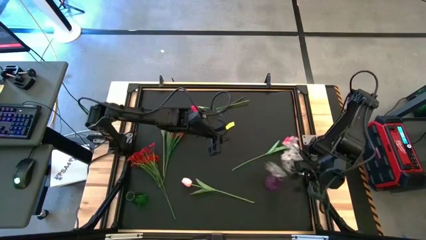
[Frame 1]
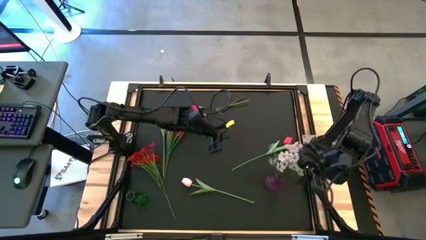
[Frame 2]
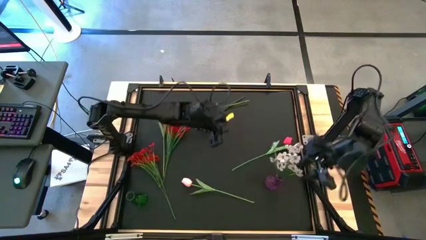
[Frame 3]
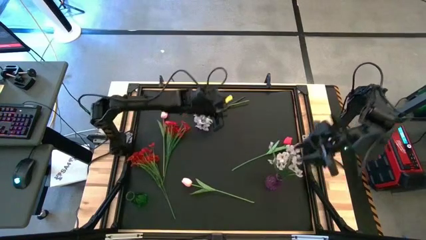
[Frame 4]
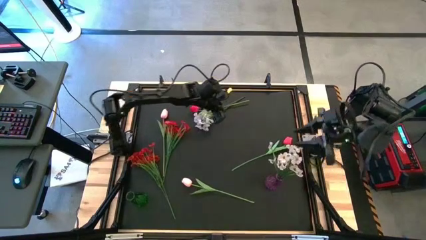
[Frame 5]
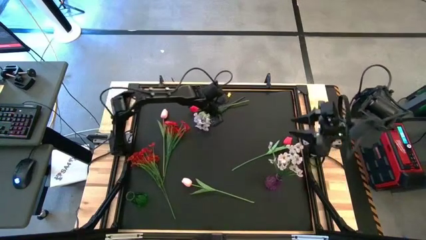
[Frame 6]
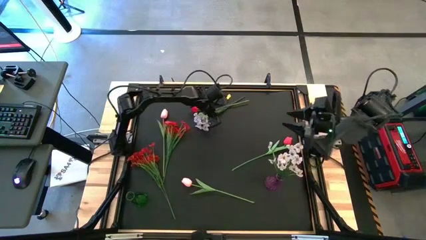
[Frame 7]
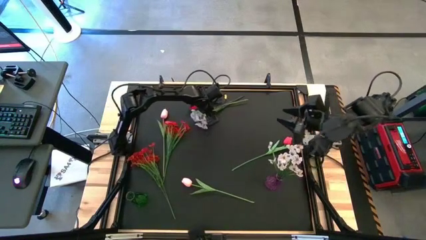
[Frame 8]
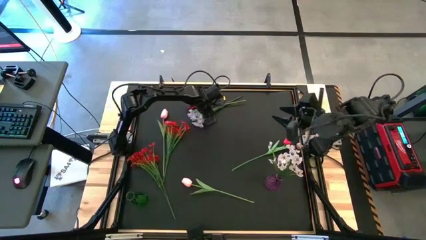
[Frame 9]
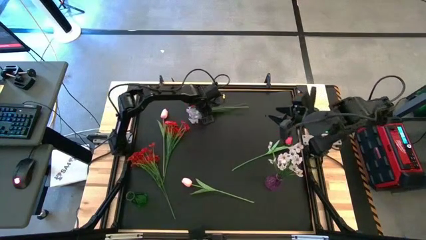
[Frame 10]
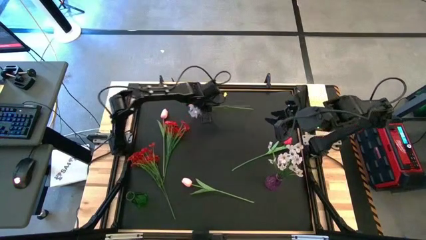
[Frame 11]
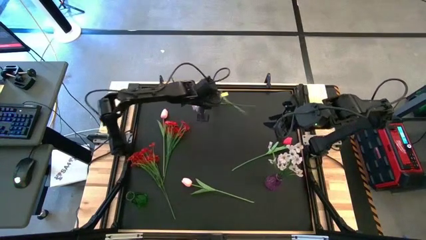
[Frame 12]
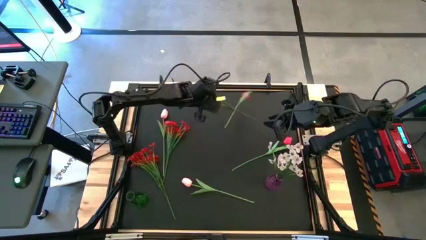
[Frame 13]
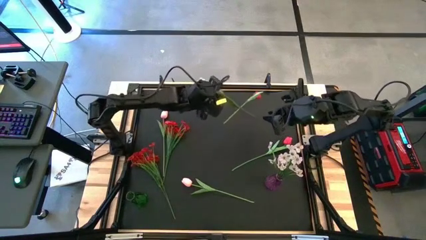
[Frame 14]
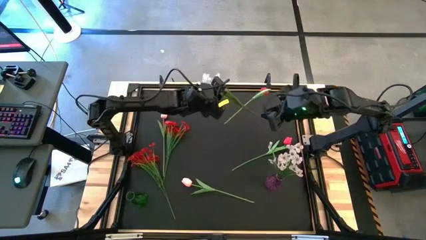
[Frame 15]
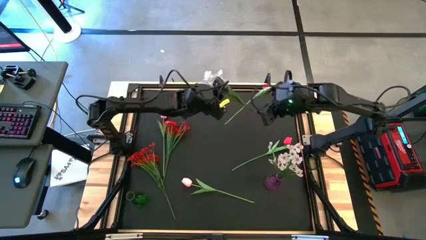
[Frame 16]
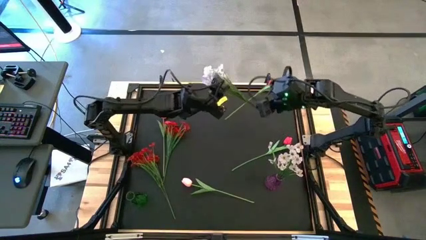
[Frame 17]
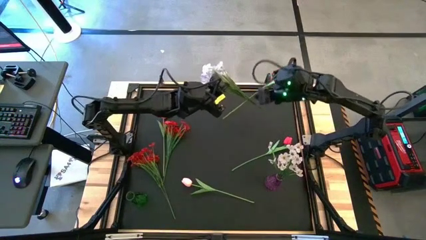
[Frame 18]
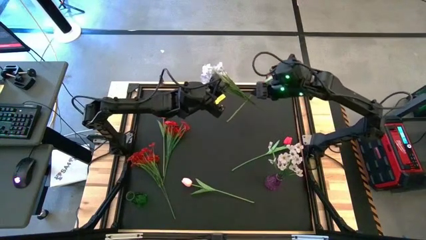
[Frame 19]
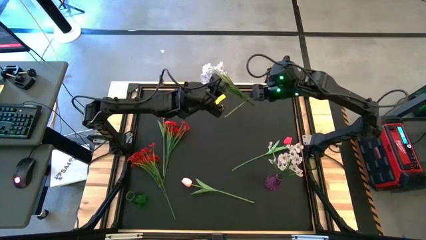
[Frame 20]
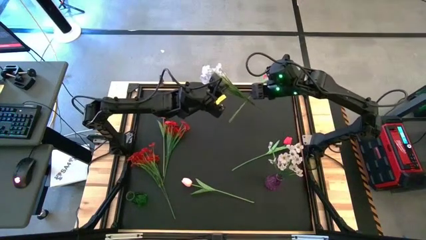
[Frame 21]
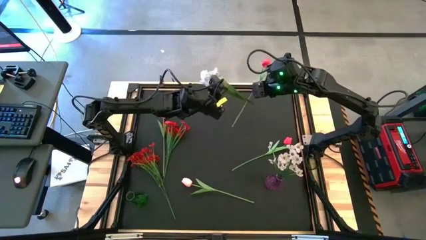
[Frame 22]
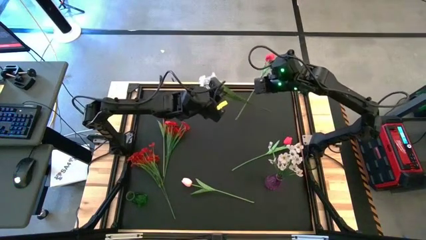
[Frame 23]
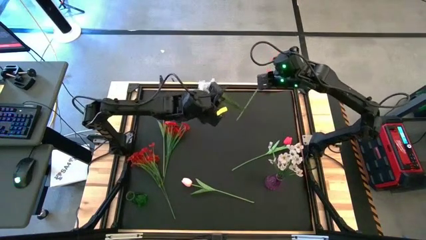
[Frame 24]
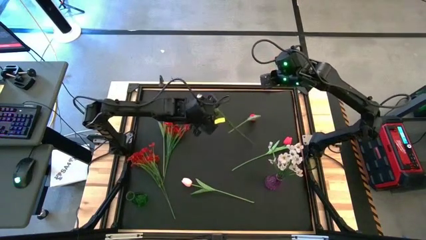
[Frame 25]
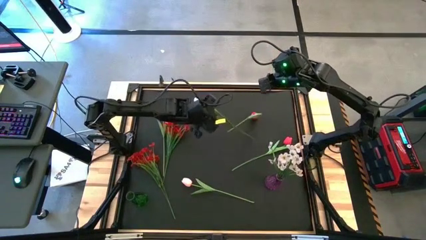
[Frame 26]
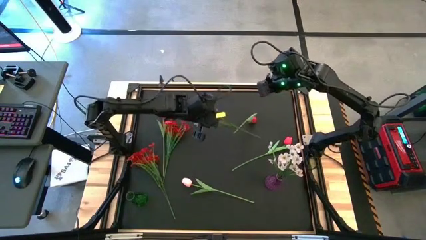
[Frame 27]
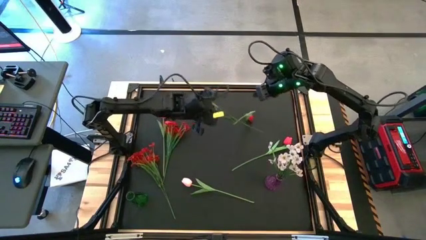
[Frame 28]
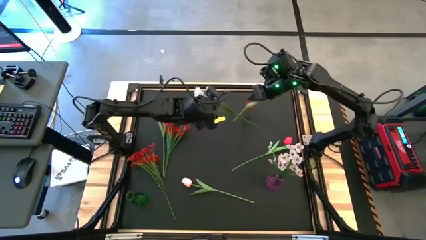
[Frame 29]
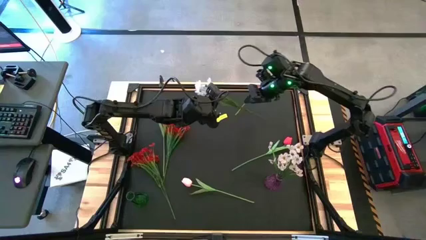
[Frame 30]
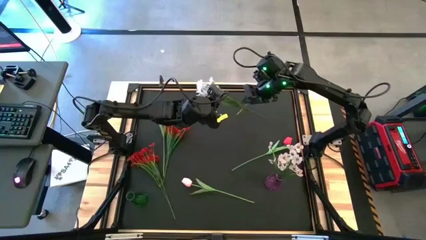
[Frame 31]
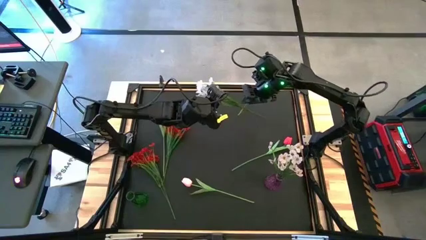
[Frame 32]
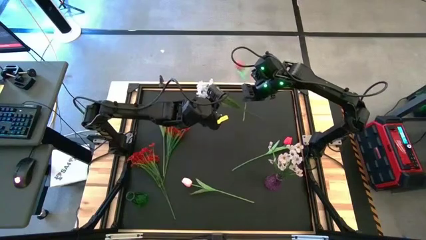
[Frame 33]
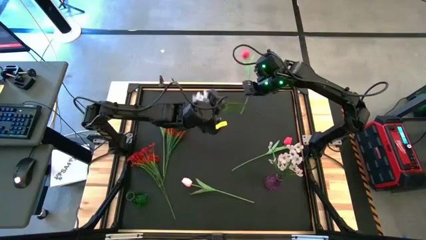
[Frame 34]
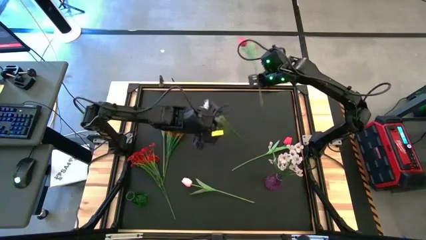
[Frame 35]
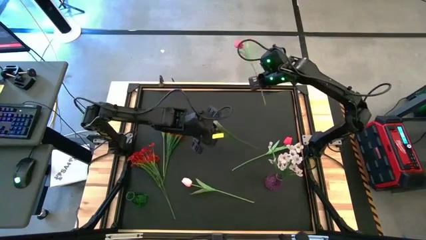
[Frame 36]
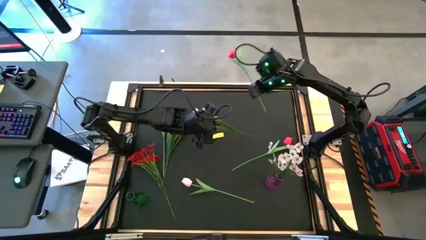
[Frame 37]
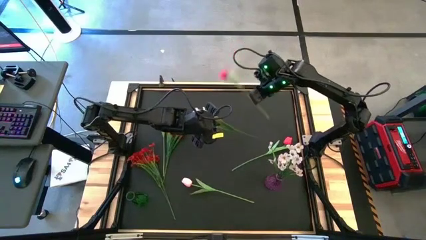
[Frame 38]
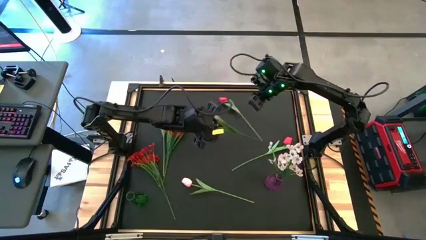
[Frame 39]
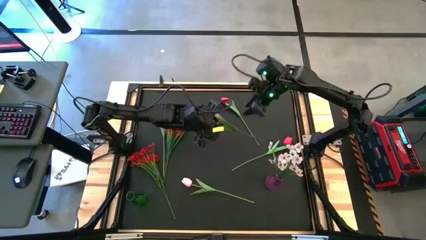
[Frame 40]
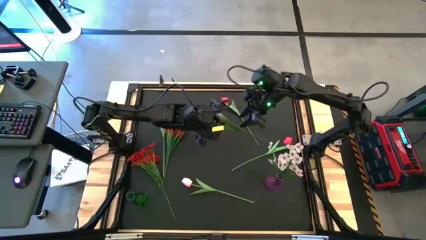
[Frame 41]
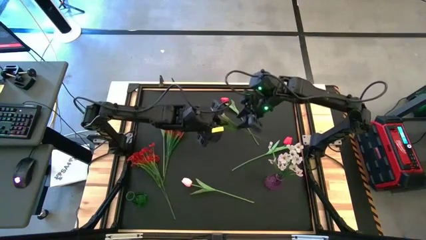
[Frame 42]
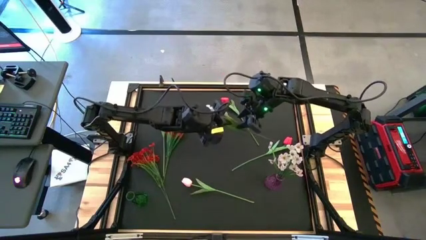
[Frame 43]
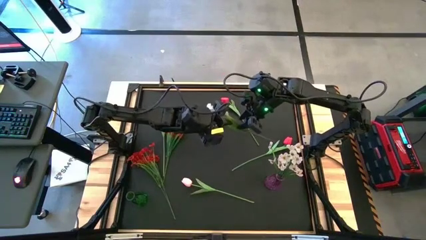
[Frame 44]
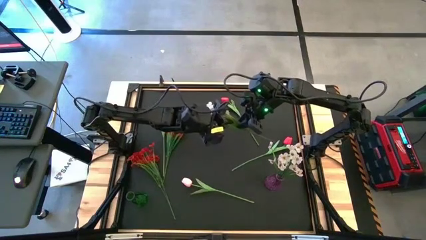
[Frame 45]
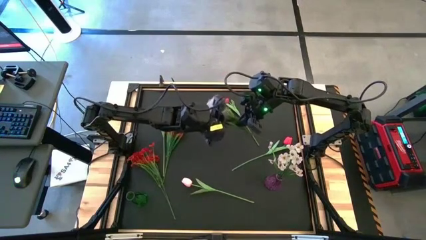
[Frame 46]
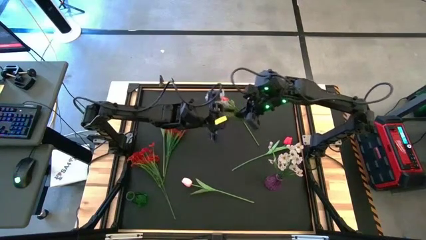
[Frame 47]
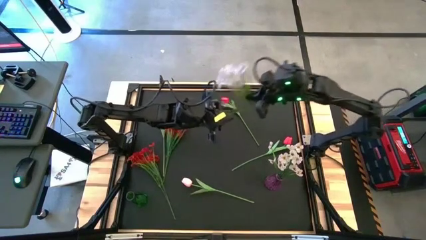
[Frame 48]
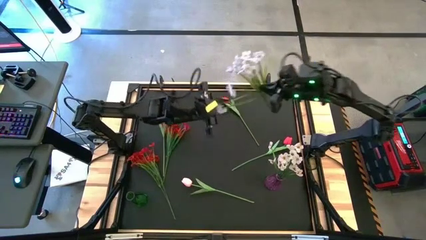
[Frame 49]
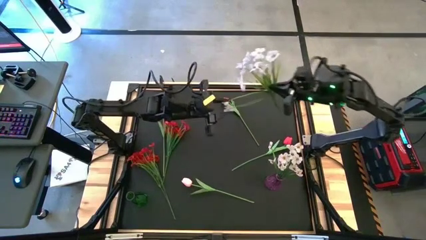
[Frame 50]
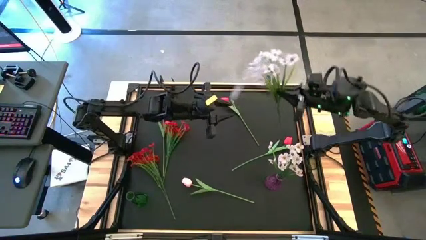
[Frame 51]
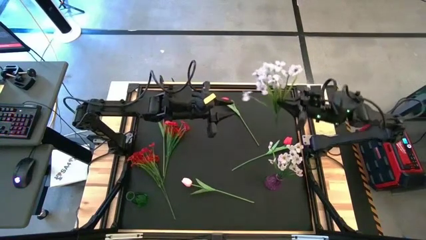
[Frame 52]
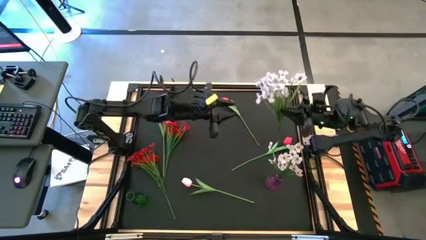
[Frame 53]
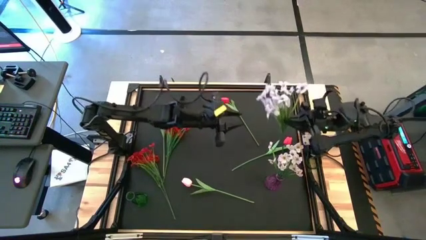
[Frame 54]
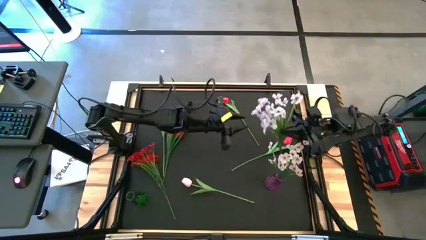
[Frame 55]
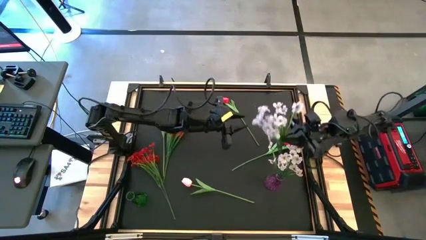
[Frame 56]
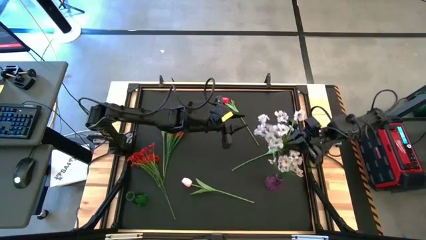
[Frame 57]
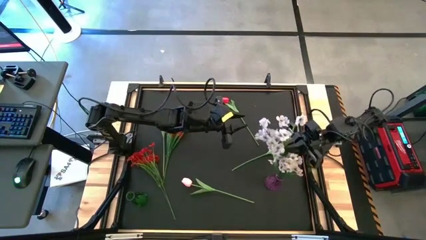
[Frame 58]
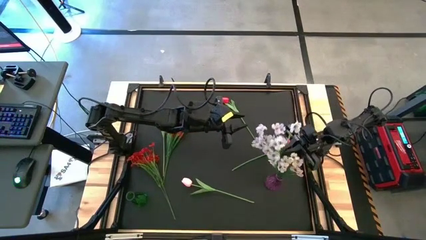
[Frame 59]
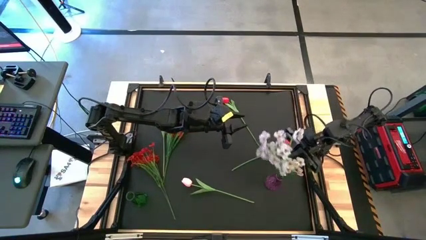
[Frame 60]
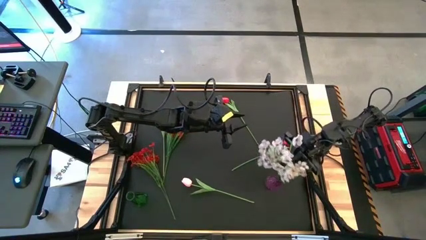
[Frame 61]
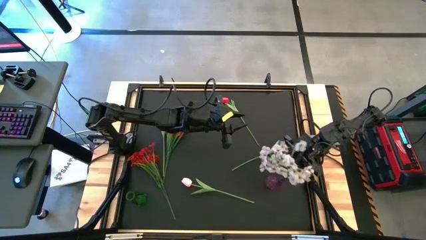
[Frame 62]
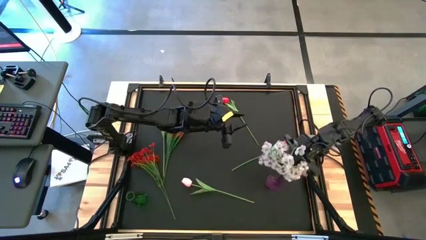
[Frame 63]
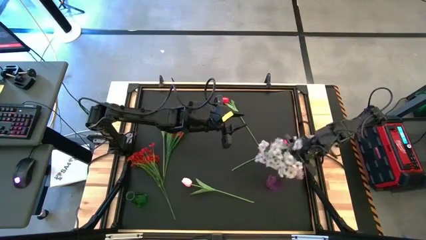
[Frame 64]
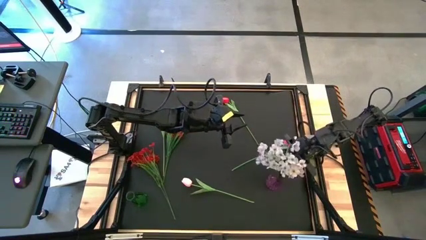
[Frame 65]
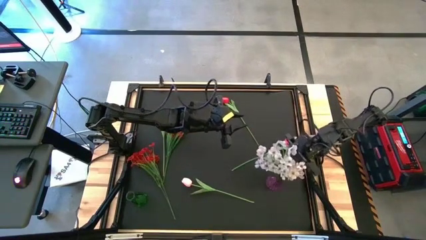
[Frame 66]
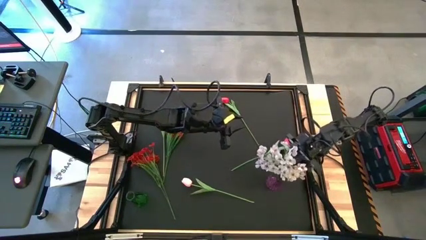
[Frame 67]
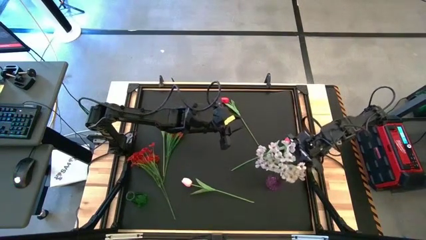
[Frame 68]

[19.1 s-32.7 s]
Task: Sort flowers into vase by color
Put the white flower into the pink vase

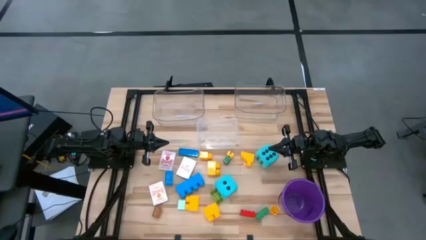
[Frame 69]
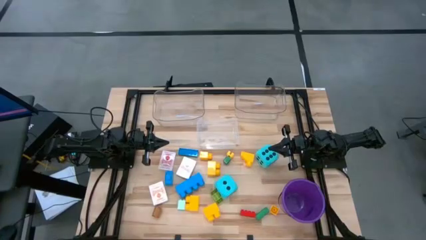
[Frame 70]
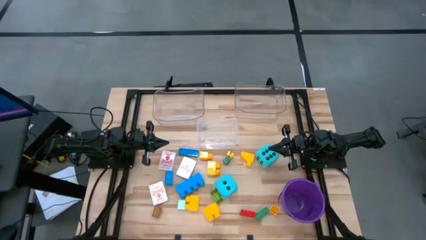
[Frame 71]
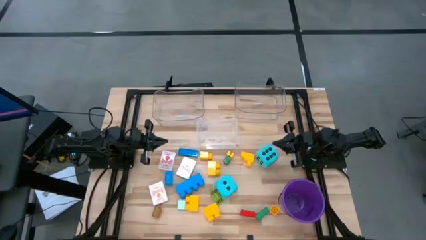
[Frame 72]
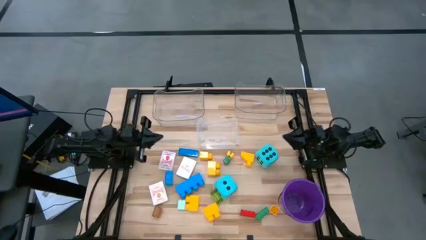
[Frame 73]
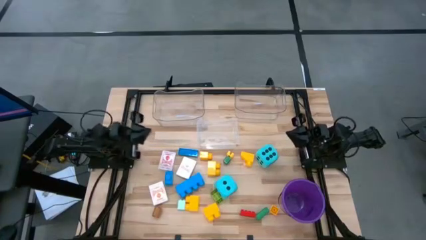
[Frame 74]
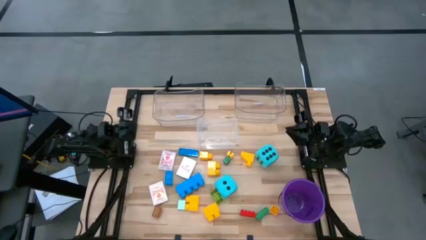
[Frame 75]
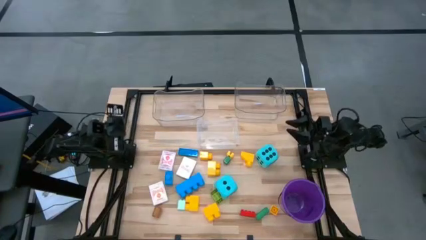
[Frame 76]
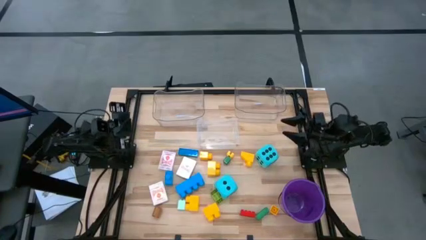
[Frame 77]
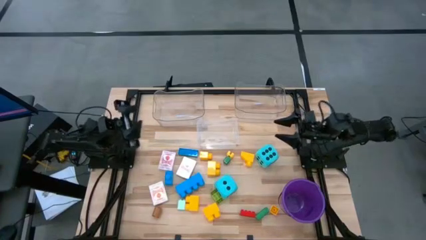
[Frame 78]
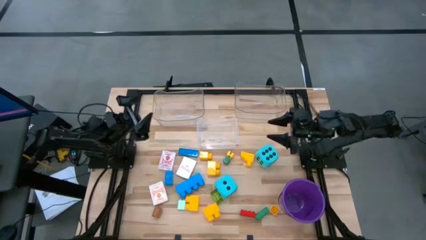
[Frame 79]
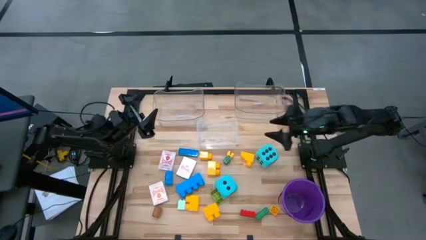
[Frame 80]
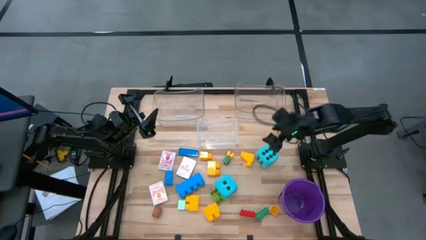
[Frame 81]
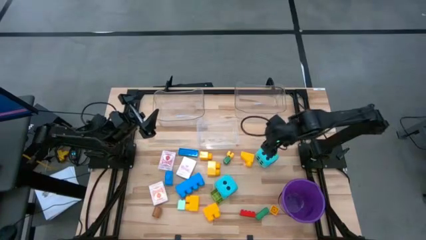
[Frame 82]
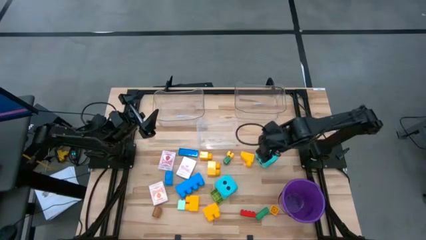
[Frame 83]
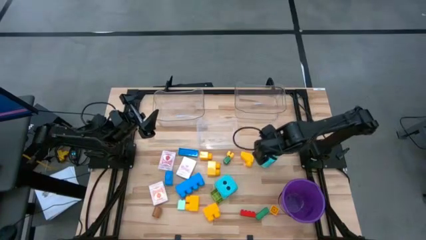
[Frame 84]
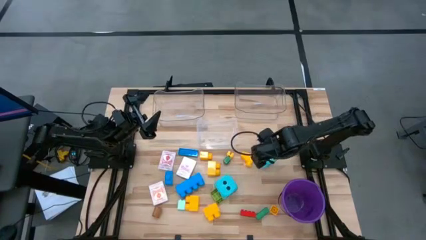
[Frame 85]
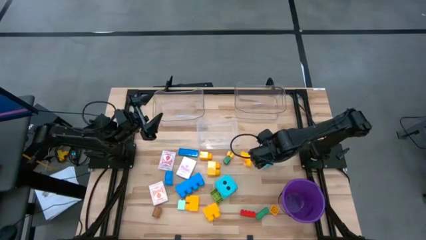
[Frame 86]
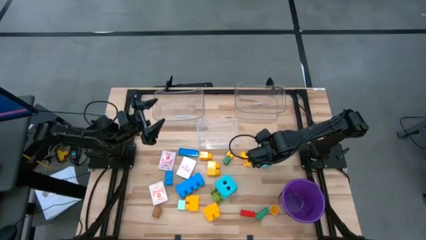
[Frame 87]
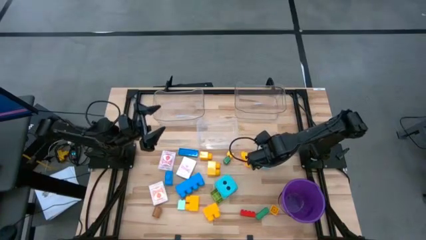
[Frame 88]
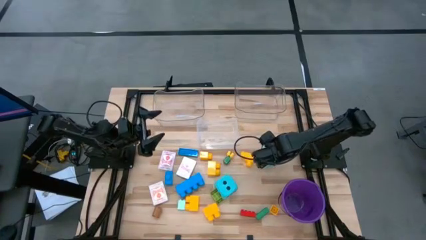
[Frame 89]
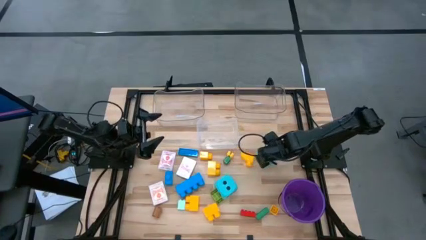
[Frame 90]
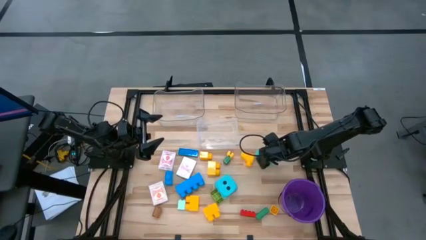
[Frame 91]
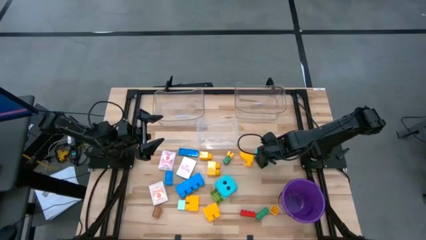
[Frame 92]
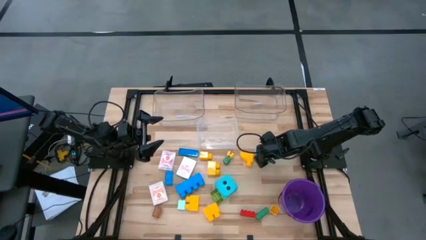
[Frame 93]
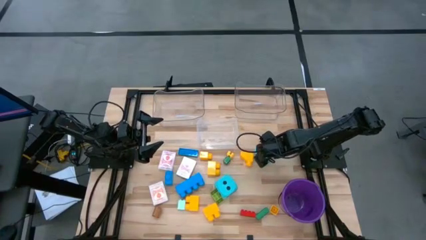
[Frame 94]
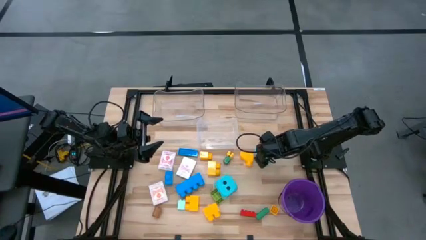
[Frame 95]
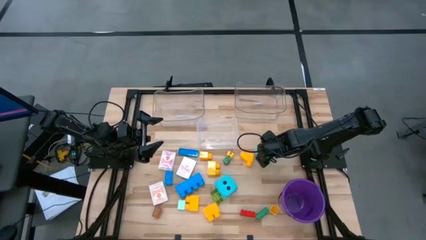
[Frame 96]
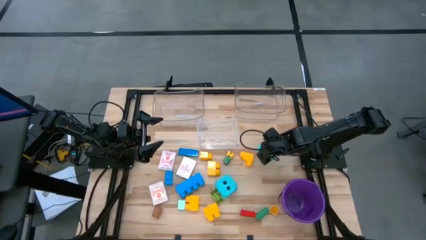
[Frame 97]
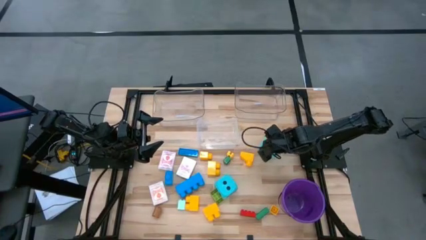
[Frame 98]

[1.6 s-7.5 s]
Task: Pick & Place Toys
Put the blue dice into the top right transparent bin
